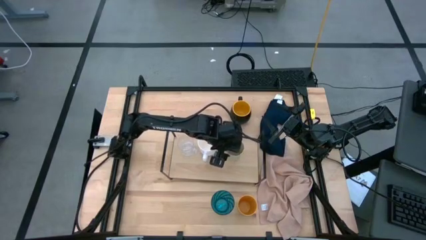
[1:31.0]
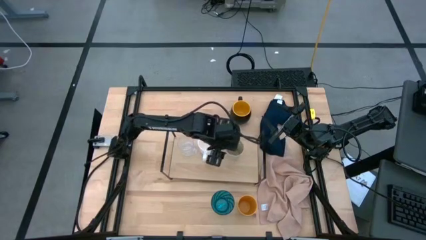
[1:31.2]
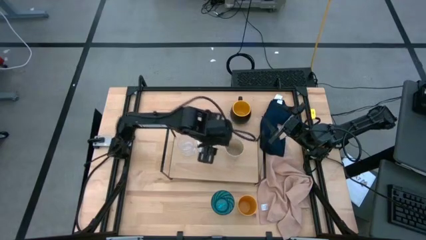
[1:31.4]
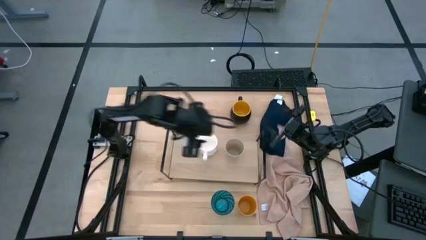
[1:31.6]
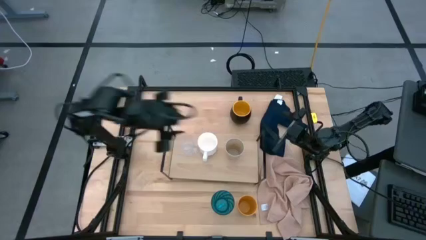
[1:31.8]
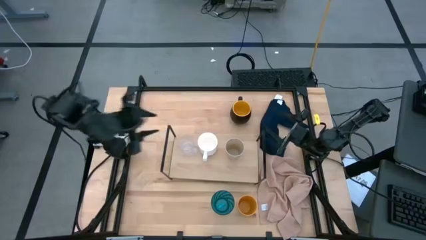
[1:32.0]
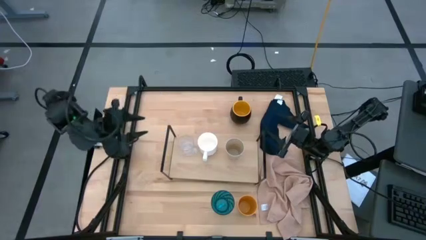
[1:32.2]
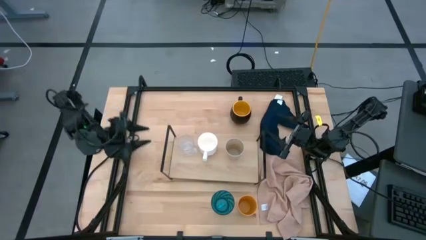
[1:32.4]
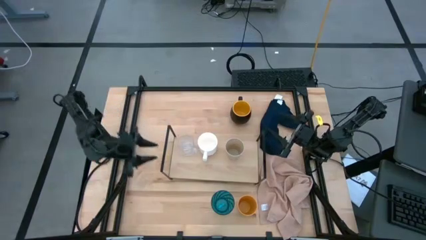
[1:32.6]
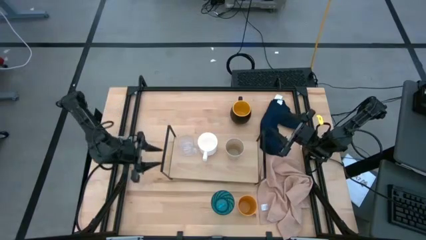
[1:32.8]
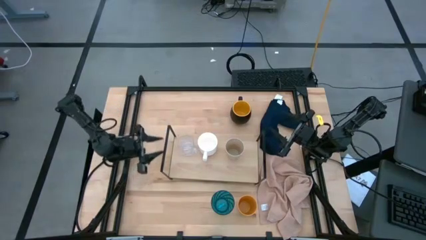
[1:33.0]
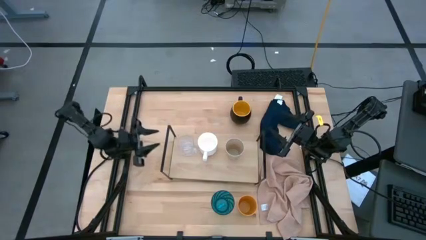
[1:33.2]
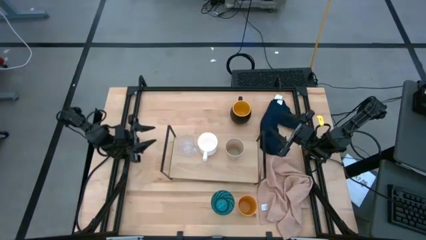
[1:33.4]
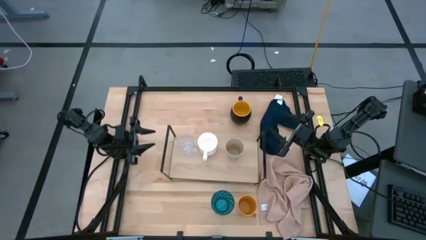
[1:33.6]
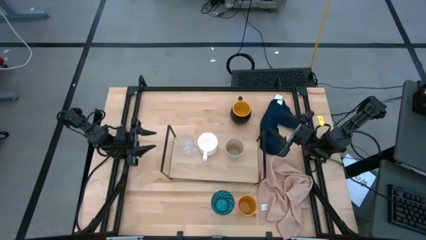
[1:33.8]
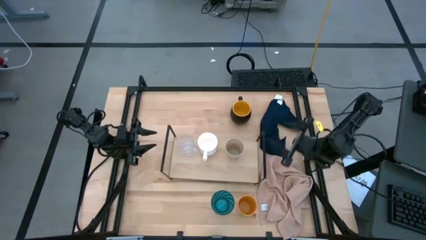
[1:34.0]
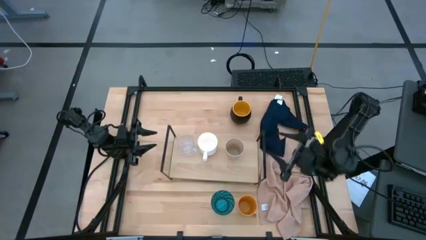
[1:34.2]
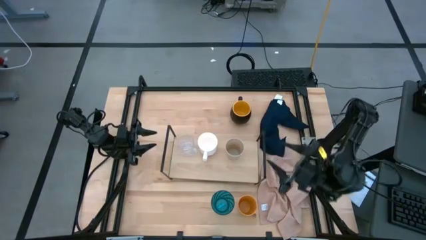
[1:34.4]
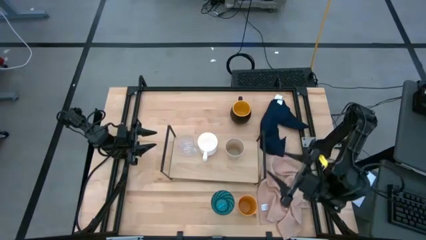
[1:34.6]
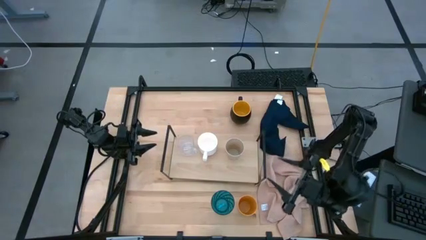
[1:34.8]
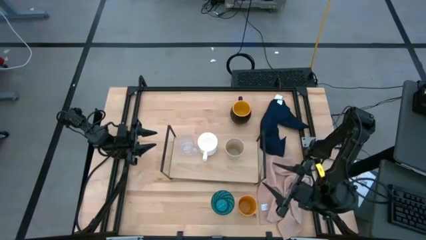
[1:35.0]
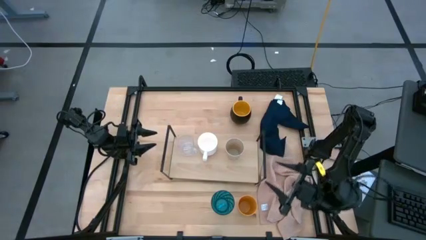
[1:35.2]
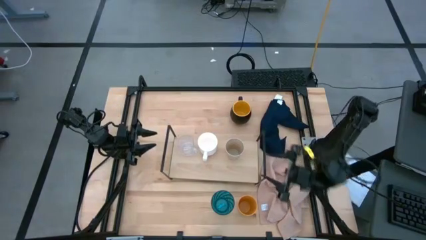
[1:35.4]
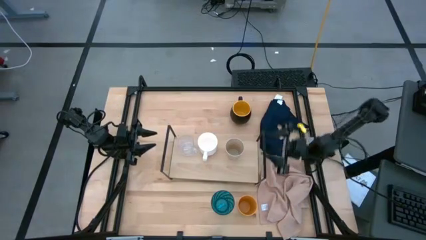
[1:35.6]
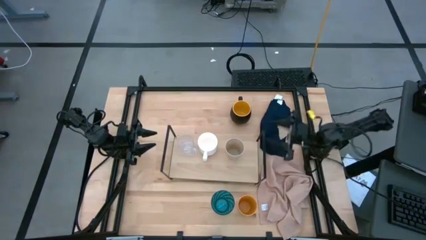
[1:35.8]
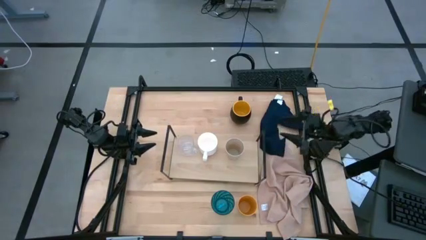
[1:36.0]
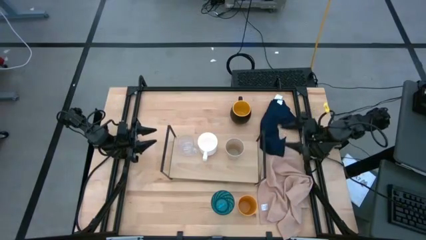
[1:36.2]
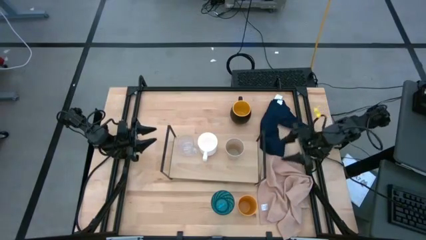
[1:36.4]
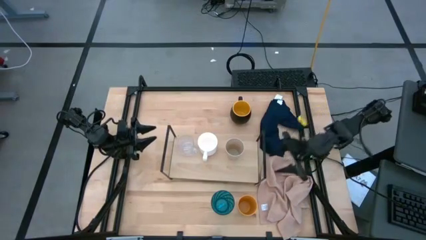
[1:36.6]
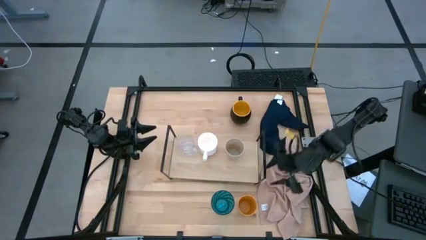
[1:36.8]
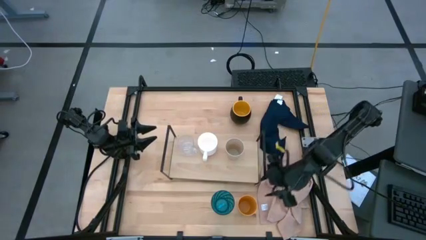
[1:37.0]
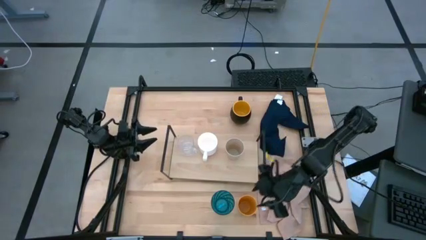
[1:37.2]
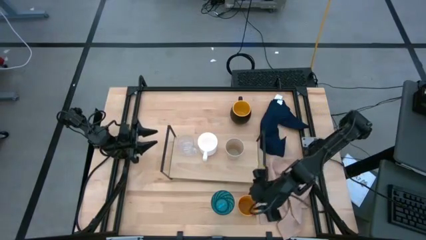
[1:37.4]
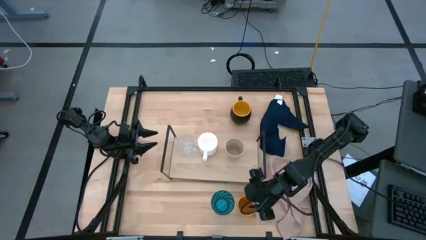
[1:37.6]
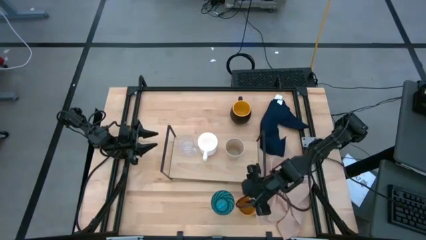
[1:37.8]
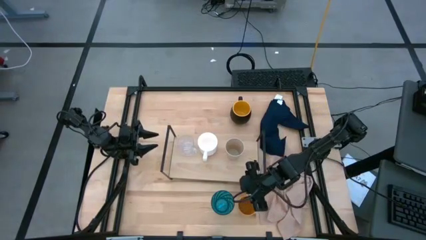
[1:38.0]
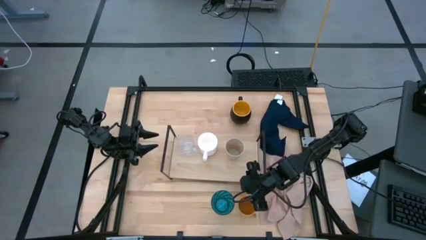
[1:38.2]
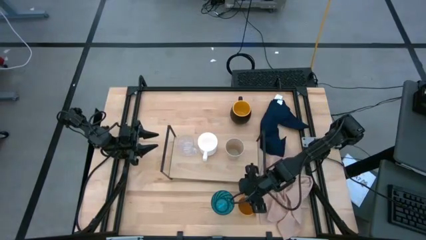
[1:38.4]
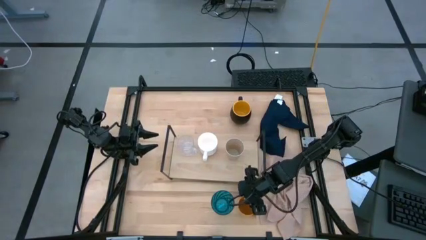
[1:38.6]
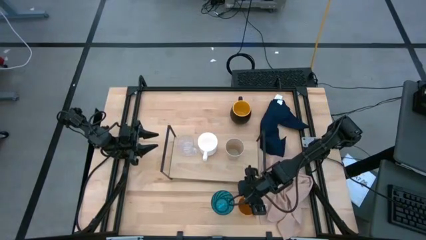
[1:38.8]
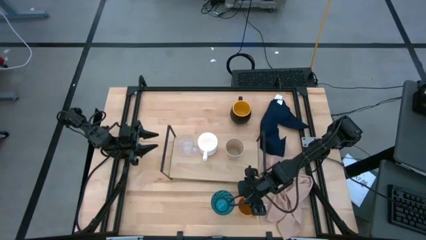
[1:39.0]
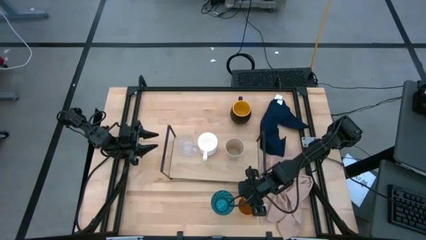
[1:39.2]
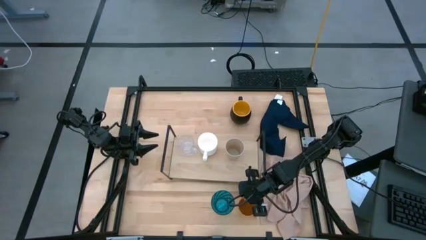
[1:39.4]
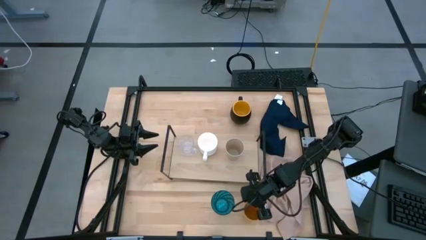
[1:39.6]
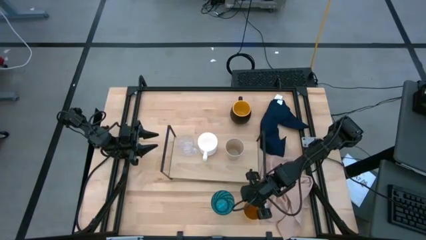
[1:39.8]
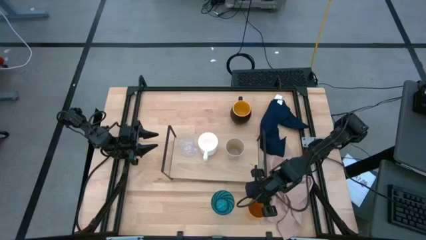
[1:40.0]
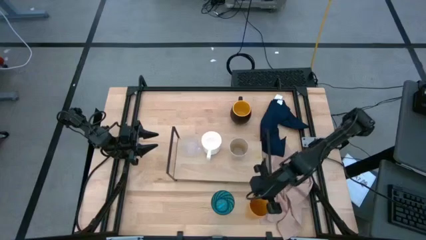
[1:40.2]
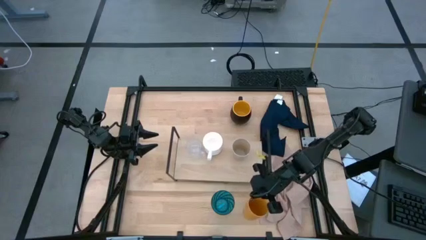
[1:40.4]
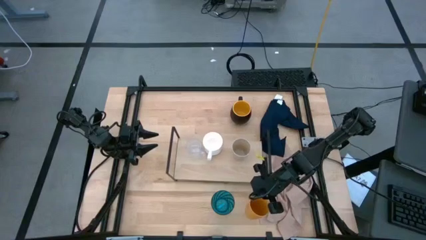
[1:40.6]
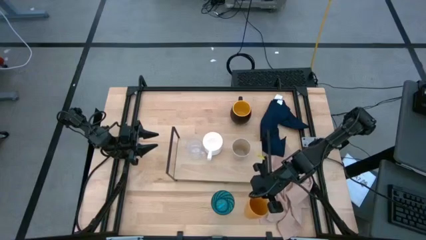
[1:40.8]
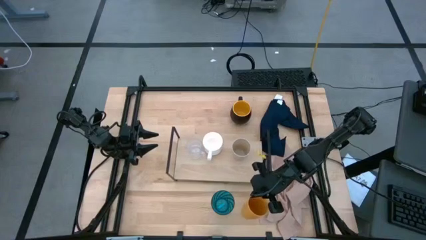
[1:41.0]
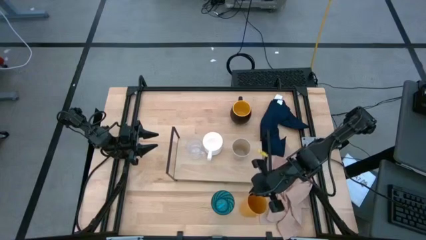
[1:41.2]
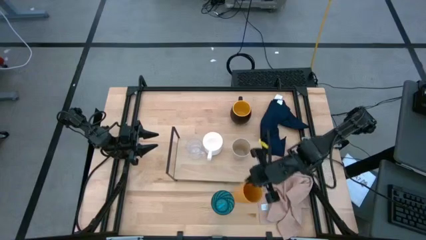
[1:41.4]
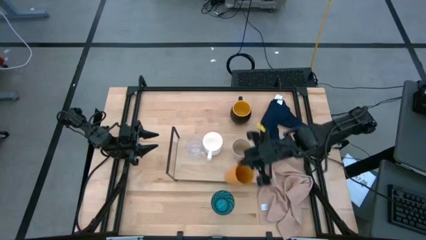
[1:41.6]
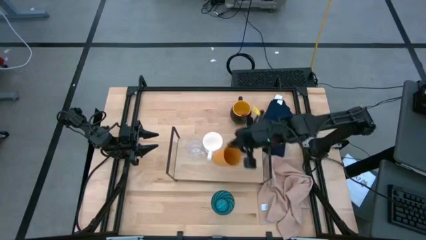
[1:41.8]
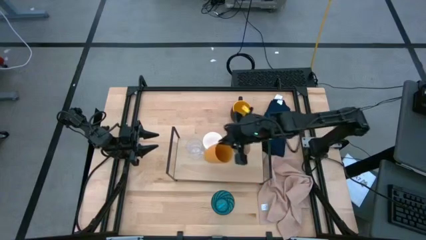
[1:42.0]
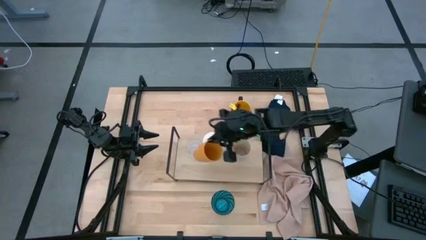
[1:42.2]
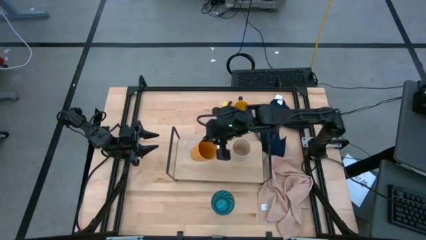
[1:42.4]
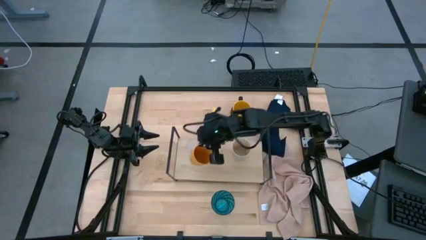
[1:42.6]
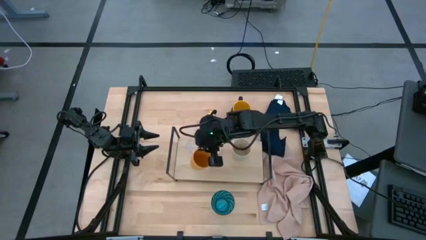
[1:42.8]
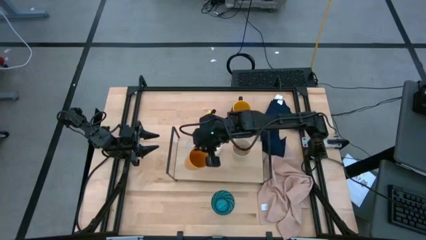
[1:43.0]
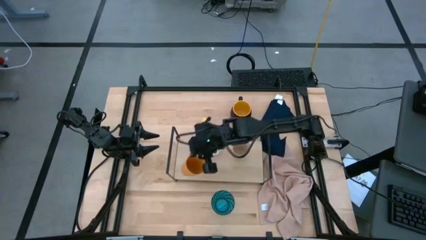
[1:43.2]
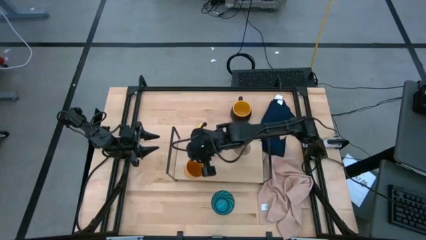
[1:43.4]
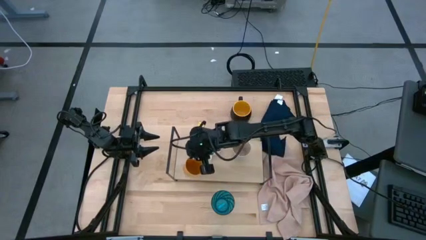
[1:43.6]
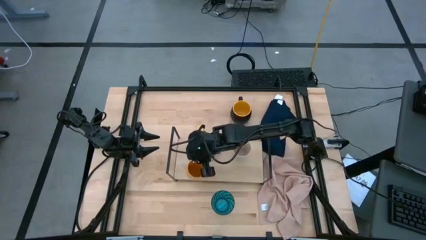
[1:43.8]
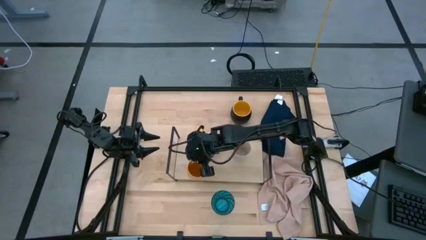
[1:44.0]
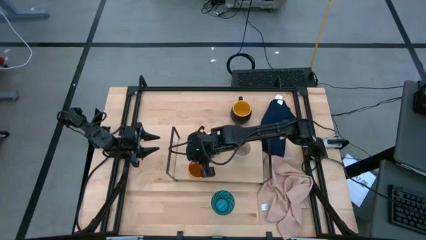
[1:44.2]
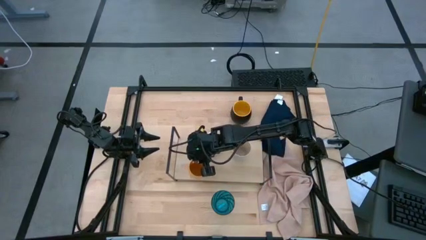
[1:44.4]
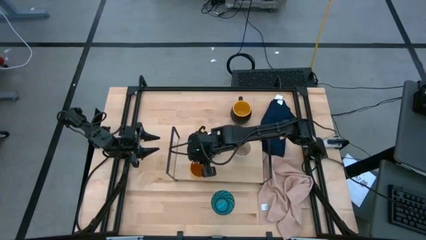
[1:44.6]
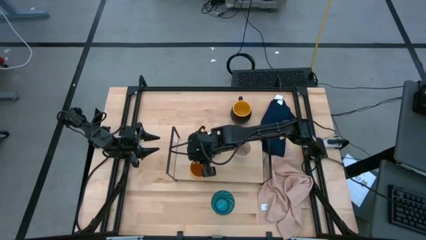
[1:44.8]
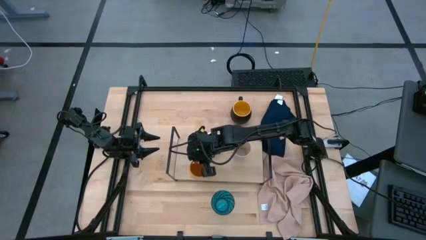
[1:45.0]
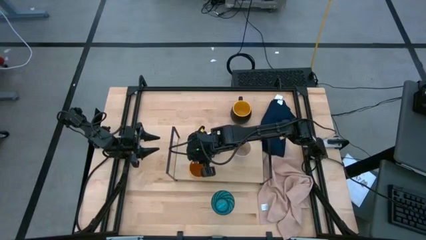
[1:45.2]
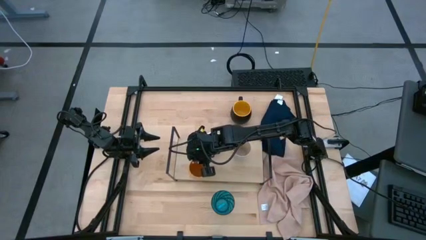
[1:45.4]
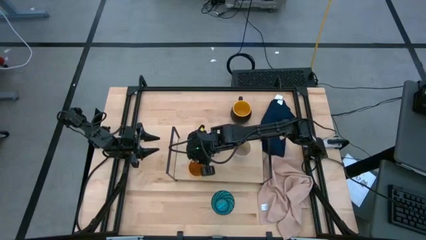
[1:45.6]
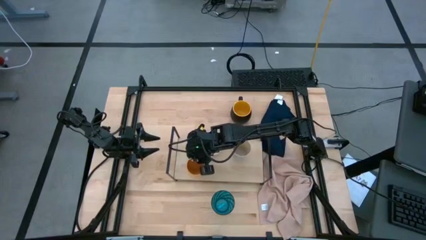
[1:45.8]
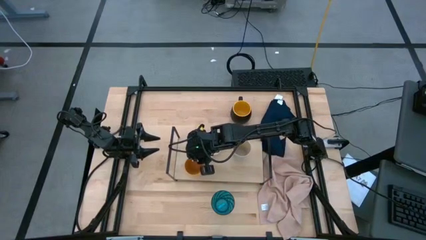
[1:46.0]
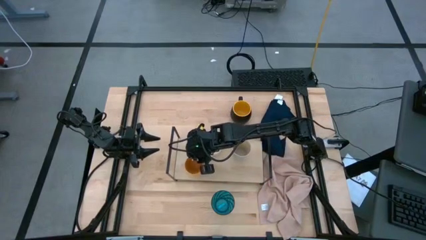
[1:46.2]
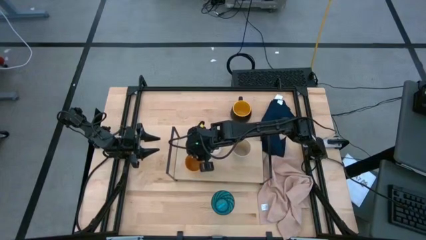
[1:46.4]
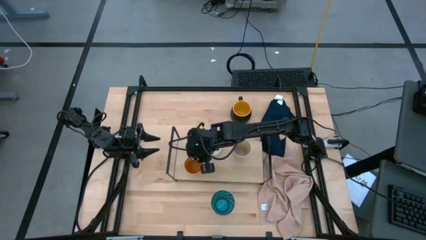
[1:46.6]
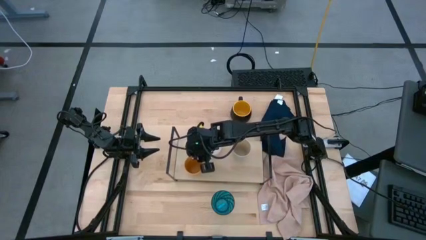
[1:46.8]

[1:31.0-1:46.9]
Task: Stack small to large cups/mugs on shelf
Align the yellow cup with the transparent mug on the shelf

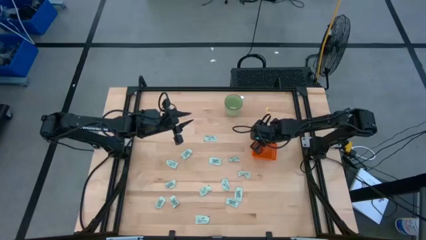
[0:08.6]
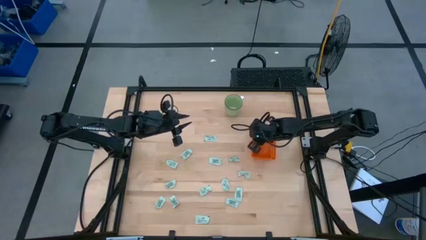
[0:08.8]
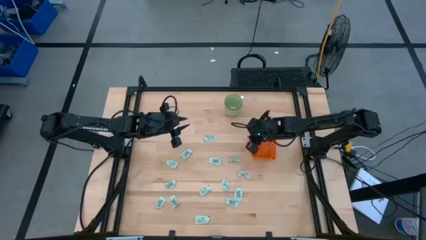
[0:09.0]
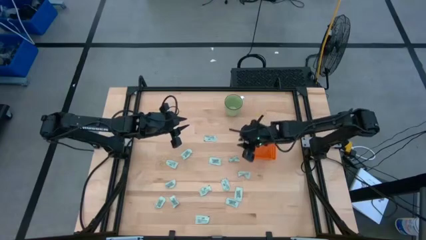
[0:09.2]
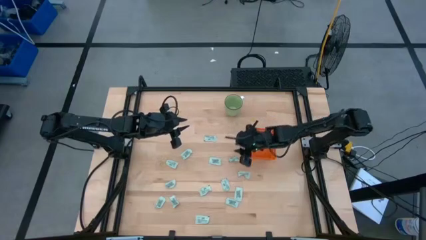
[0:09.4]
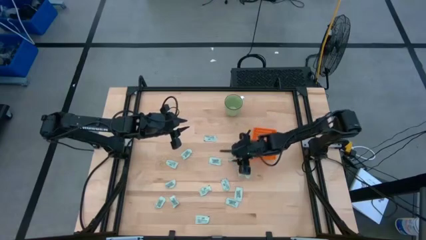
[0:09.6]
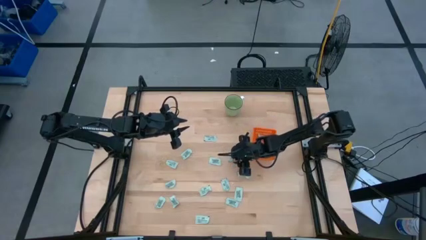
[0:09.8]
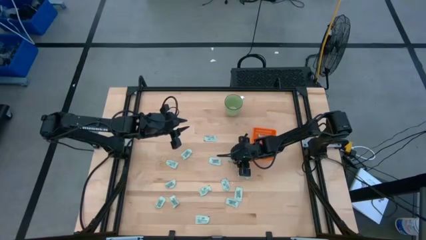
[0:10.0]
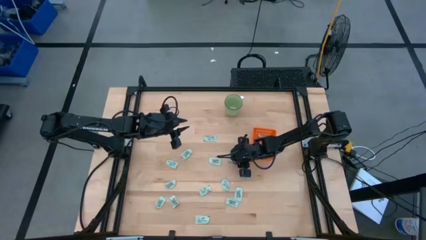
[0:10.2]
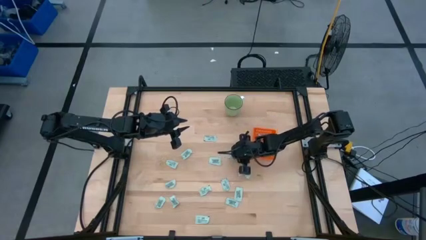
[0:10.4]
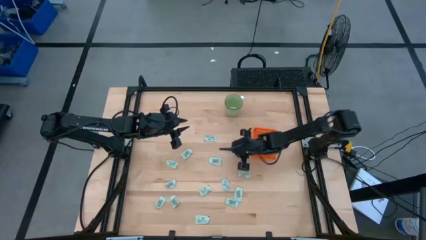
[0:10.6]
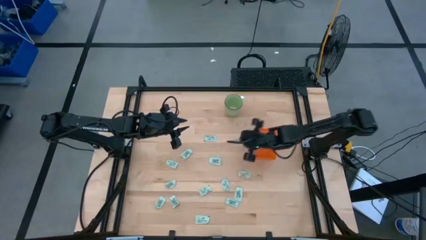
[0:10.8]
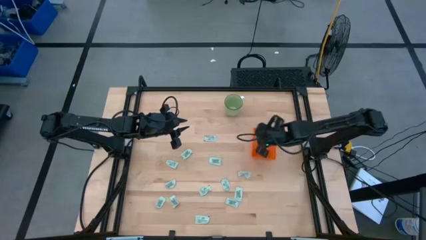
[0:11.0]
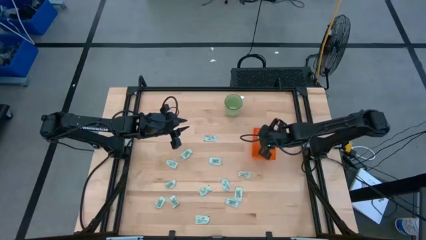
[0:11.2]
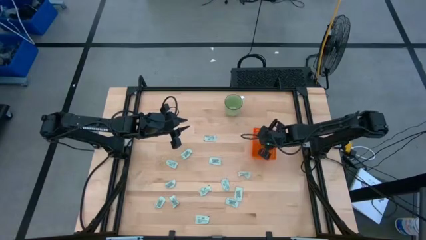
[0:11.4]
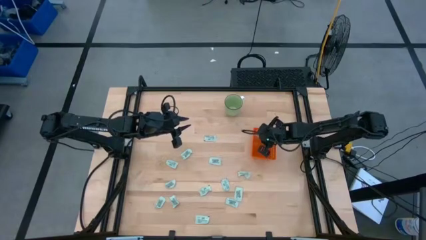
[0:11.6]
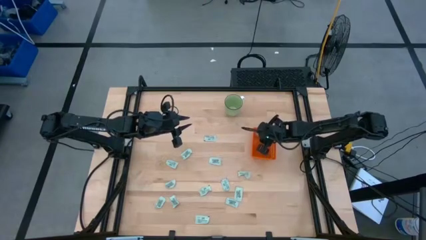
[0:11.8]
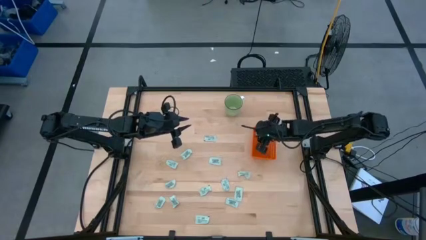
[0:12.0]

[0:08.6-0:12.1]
Task: Pick and place Stevia / Truvia into bins
Put the light green packet into the orange basket
